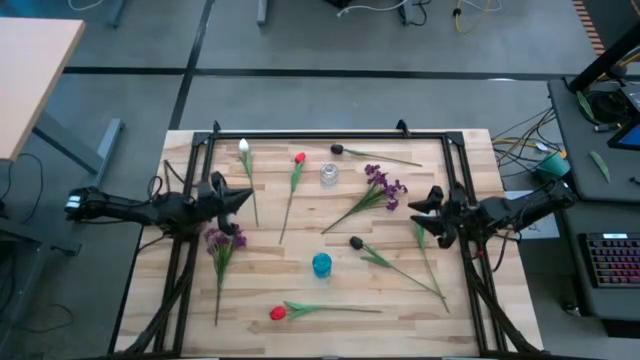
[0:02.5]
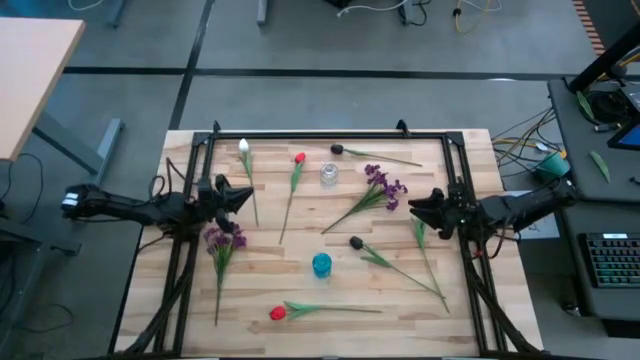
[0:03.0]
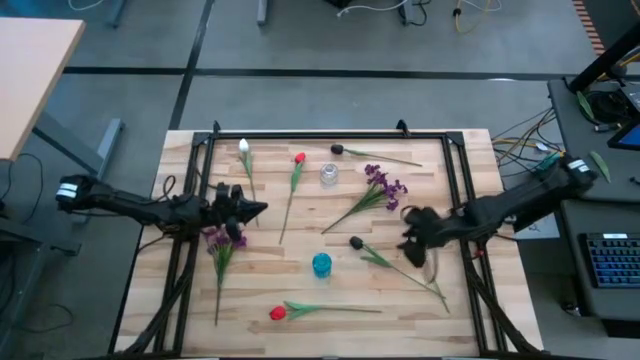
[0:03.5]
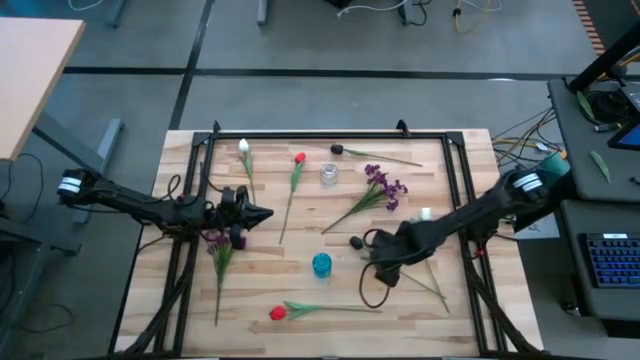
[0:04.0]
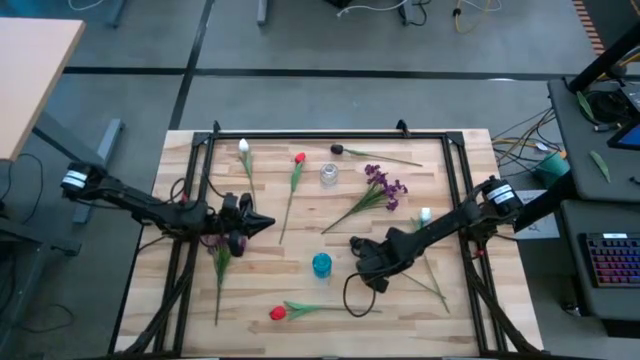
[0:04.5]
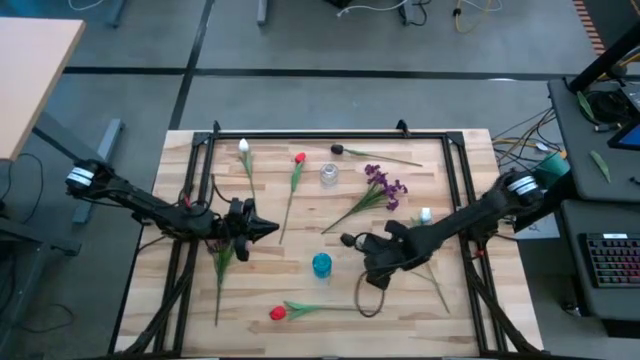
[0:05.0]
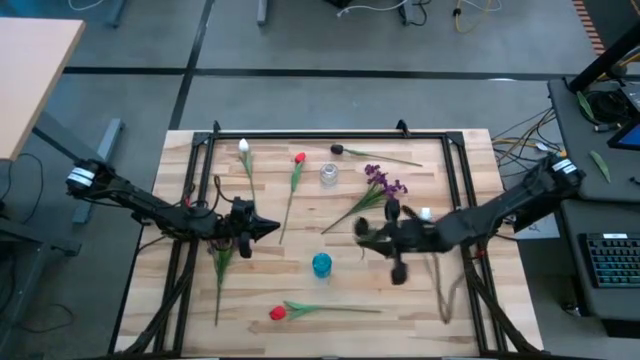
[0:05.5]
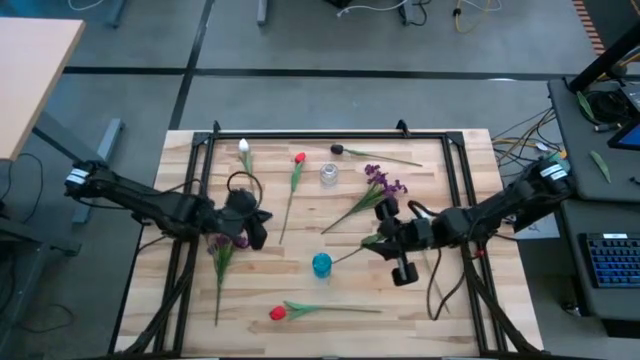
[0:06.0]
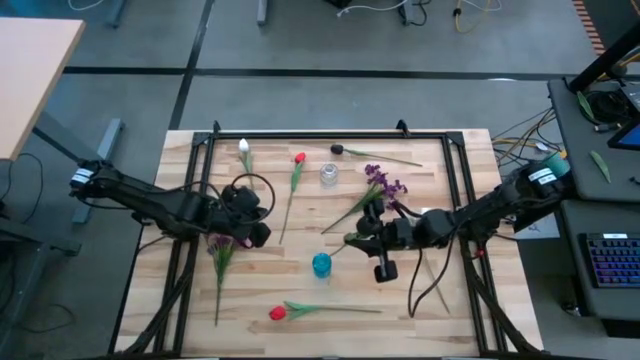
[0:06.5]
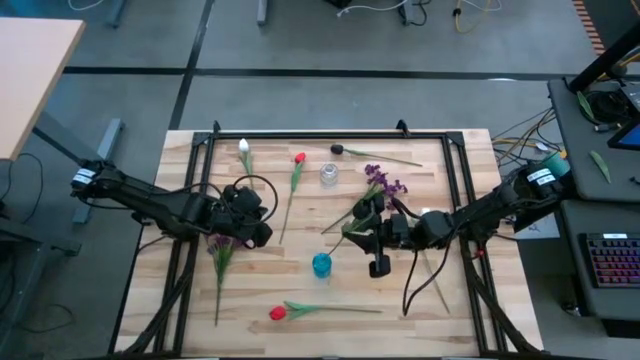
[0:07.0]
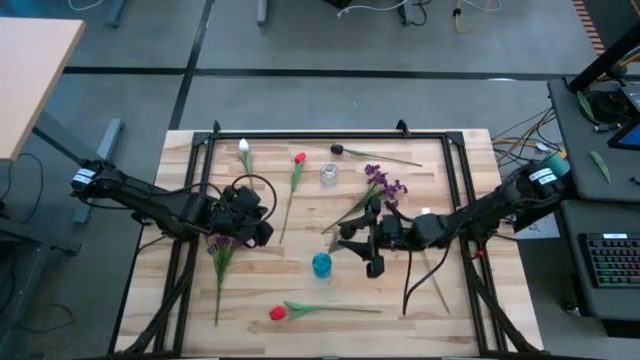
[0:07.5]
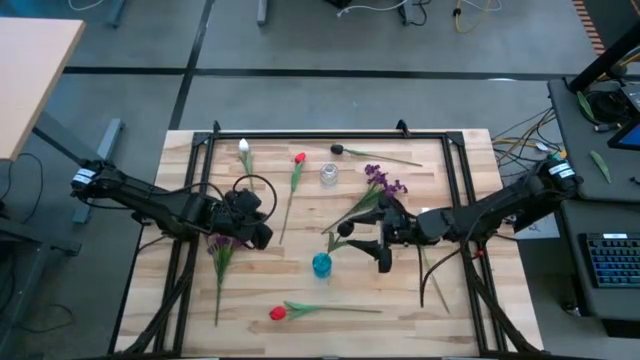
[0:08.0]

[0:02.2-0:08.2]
Task: Sort flowers into vase by color
Put the bottom black flower into the blue vase

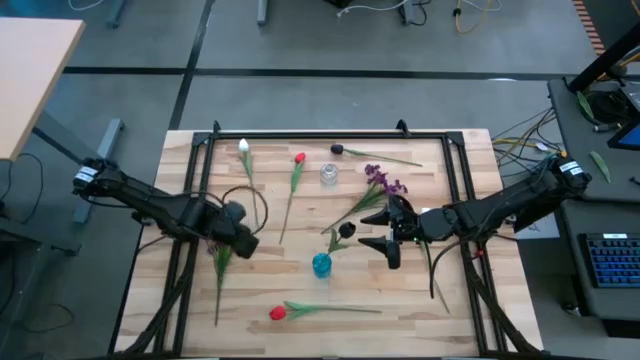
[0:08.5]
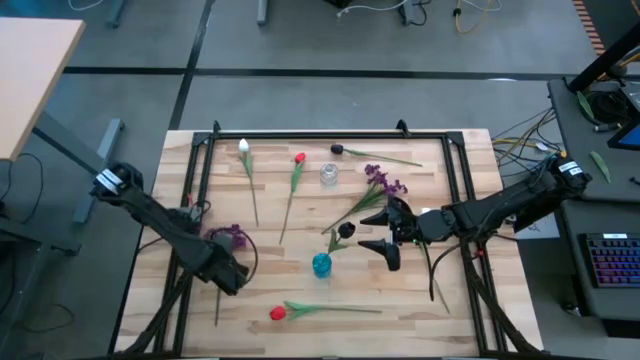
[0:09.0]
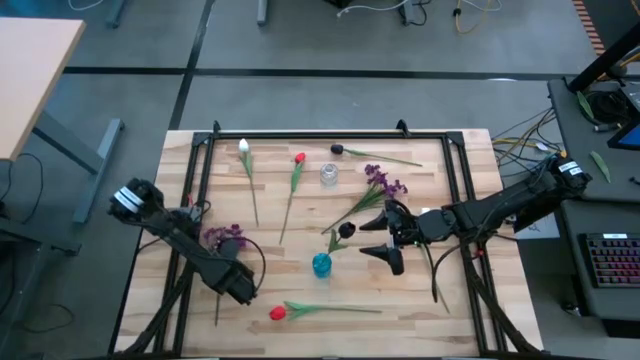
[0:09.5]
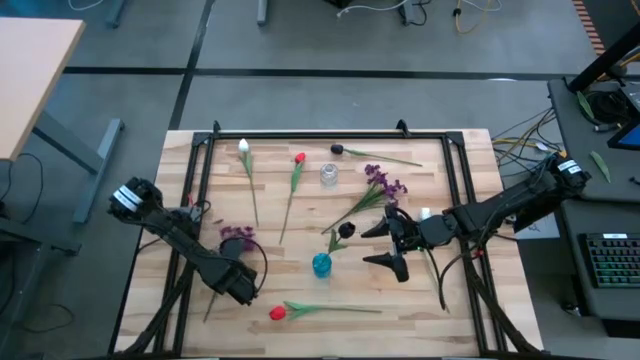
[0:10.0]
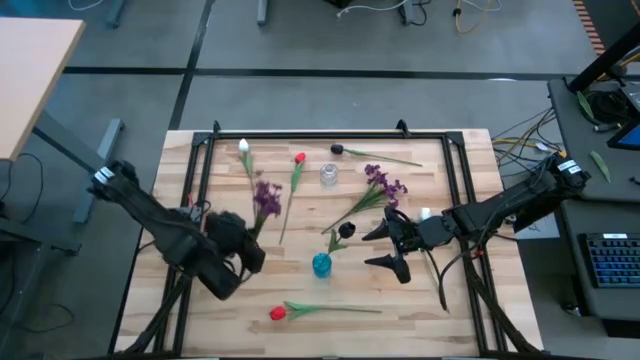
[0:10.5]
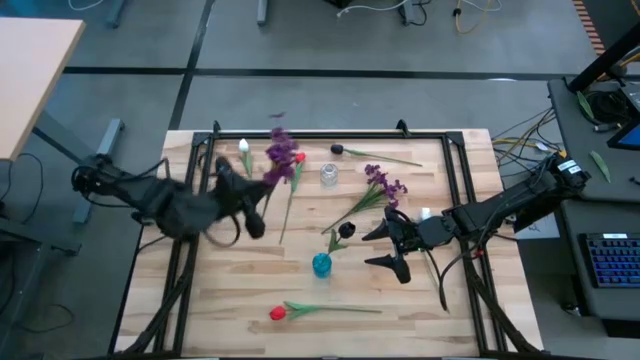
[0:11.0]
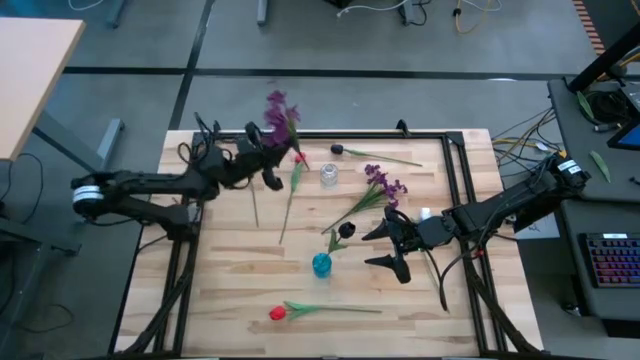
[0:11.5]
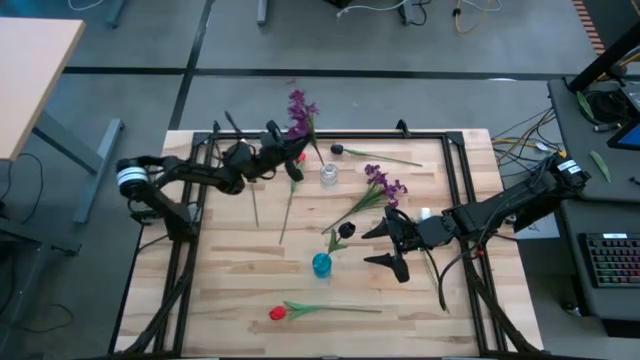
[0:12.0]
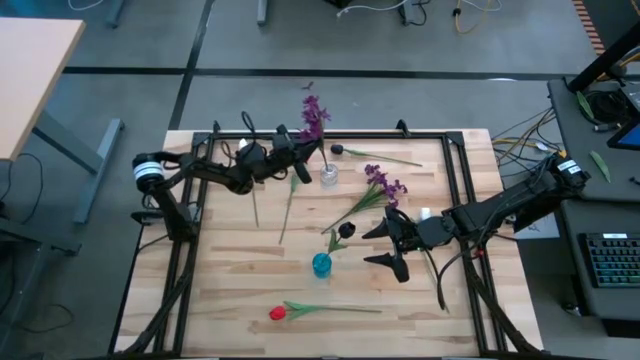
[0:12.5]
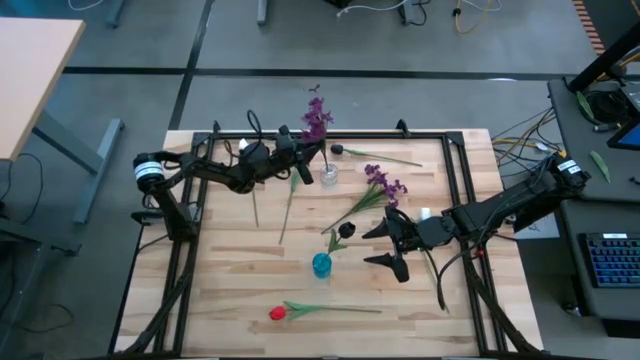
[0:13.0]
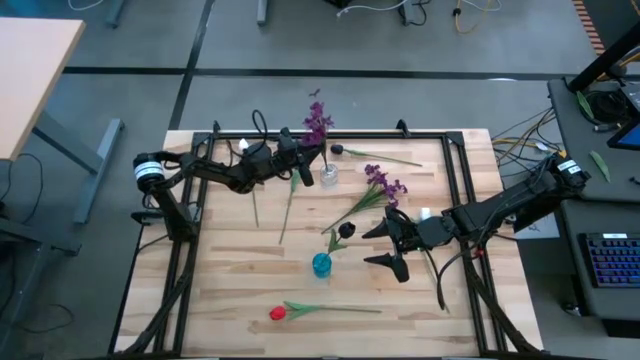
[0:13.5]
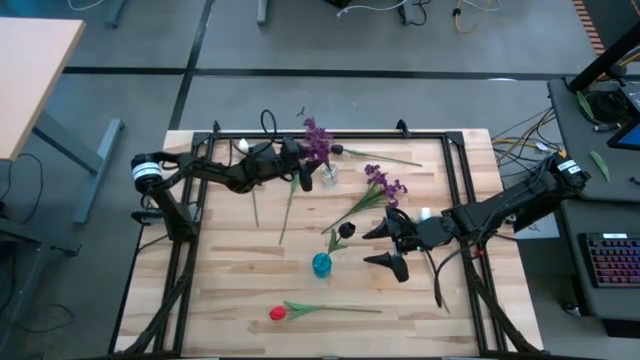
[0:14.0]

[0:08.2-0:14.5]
Put the top violet flowers into the transparent vase

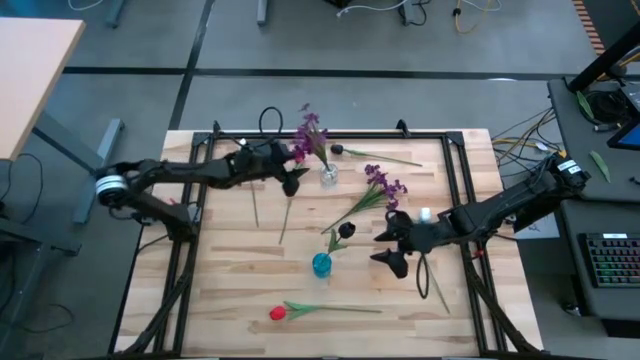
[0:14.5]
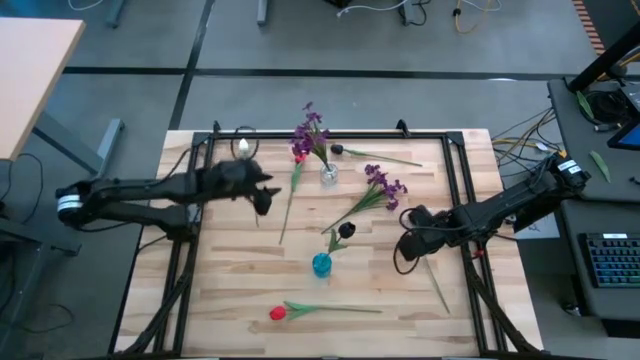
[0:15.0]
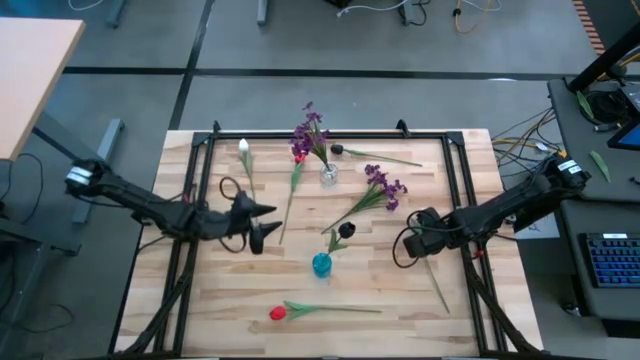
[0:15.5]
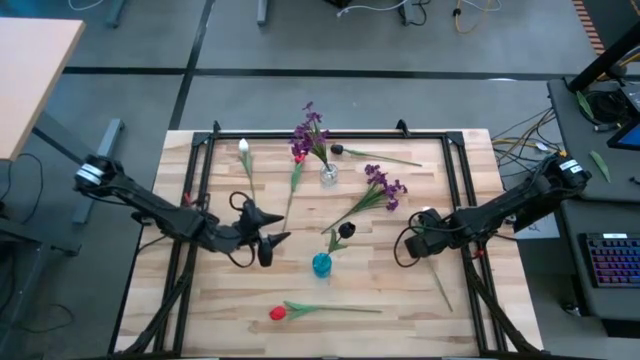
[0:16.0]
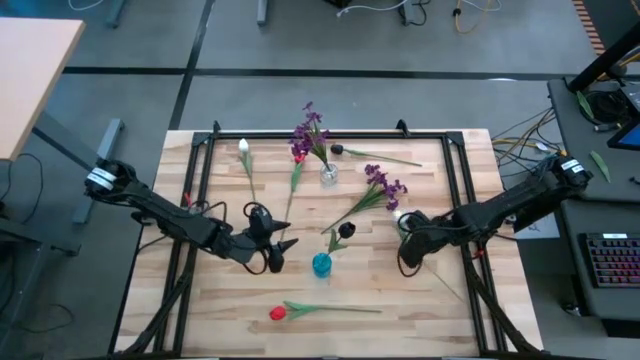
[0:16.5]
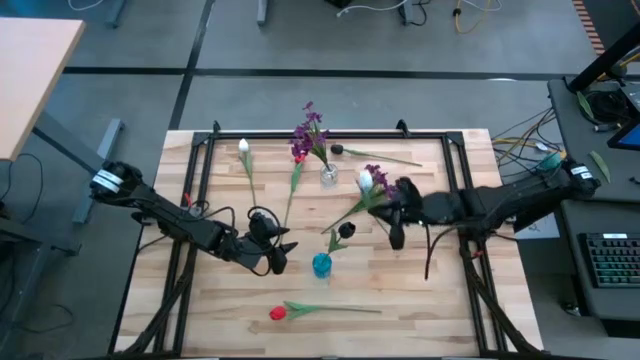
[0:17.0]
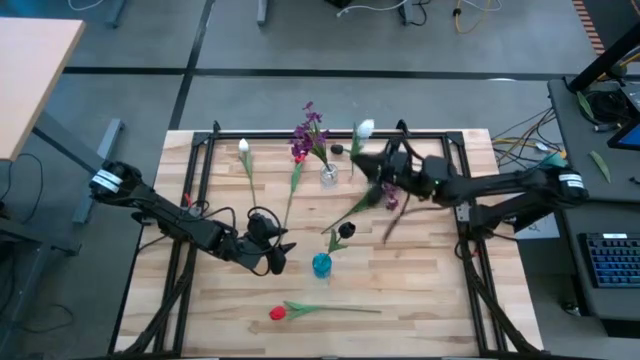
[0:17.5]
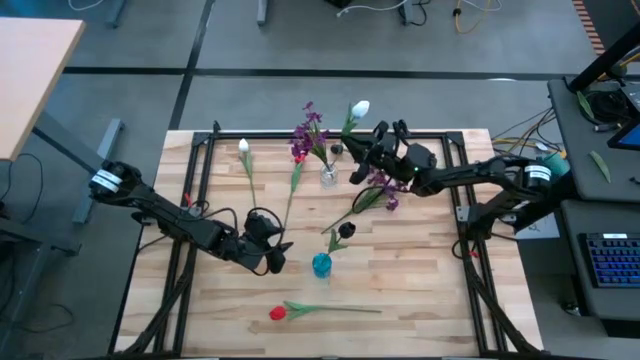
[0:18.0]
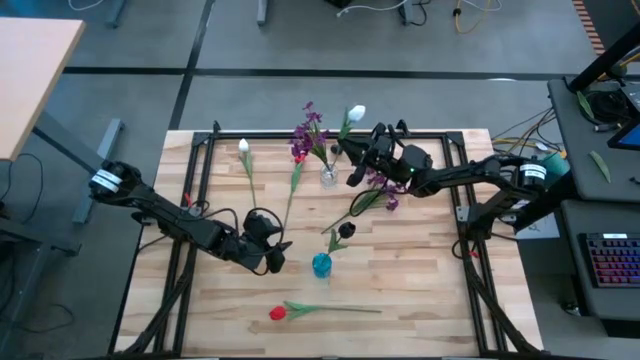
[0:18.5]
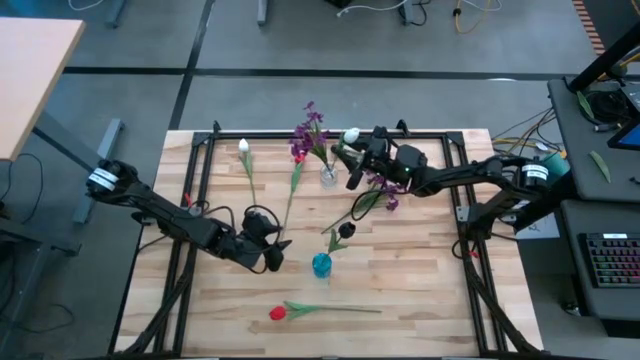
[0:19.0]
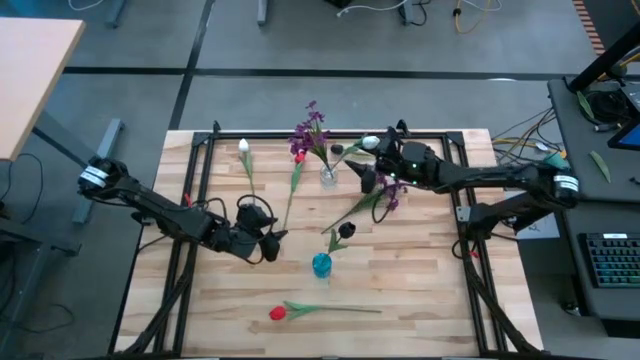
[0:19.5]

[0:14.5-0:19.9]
Put the bottom white flower into the transparent vase

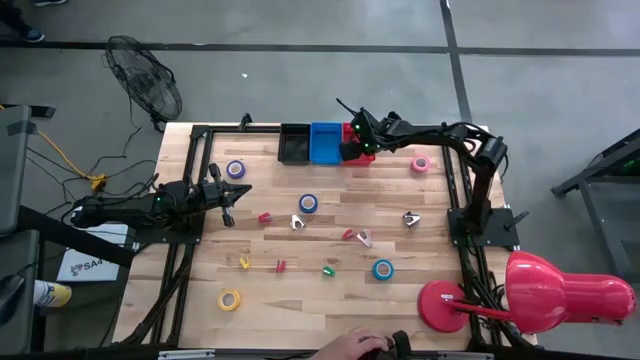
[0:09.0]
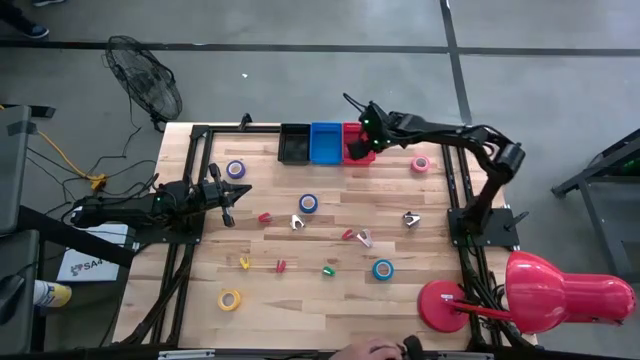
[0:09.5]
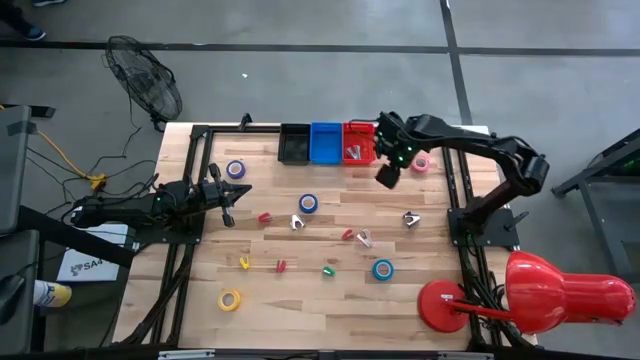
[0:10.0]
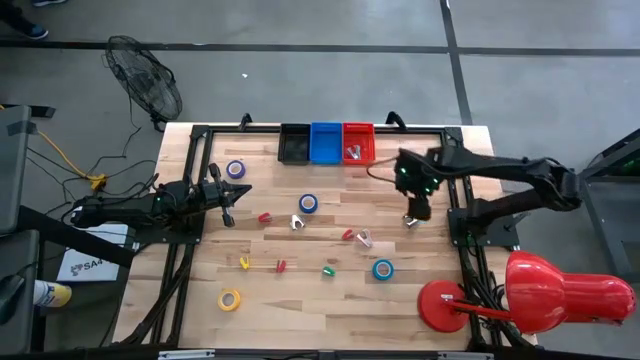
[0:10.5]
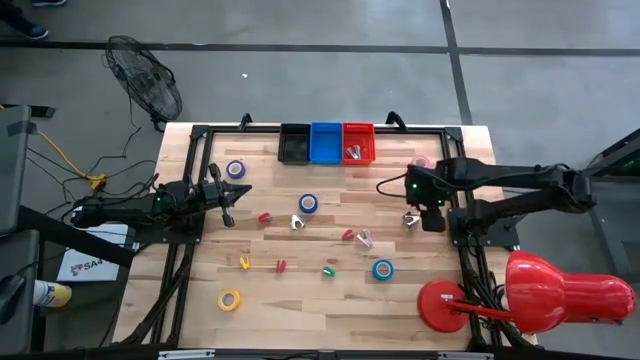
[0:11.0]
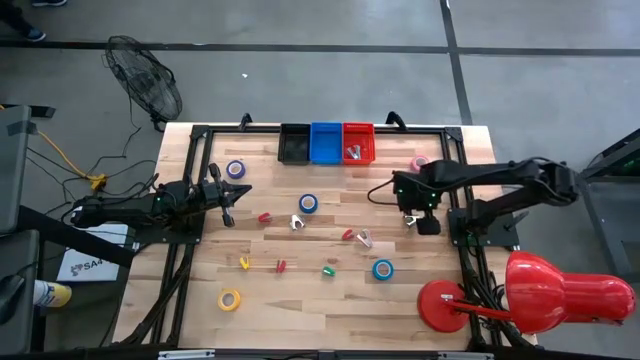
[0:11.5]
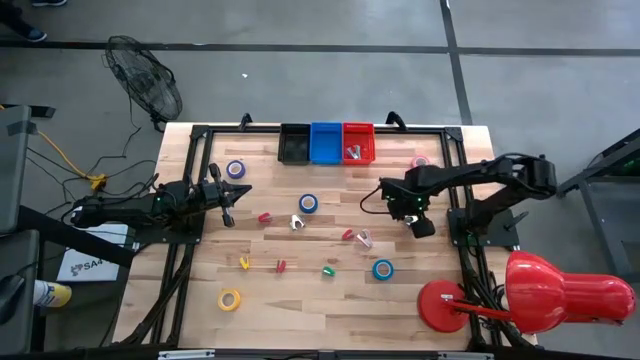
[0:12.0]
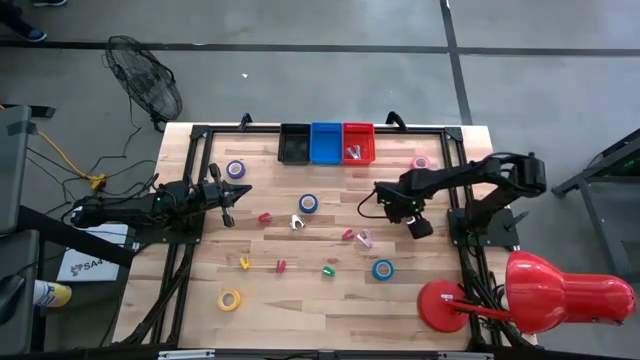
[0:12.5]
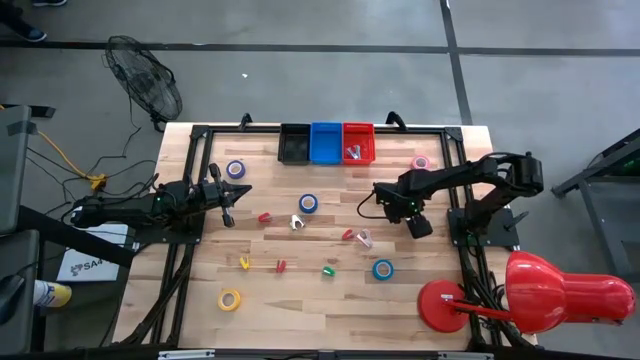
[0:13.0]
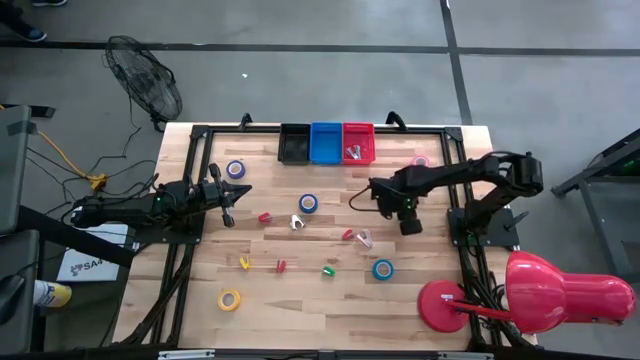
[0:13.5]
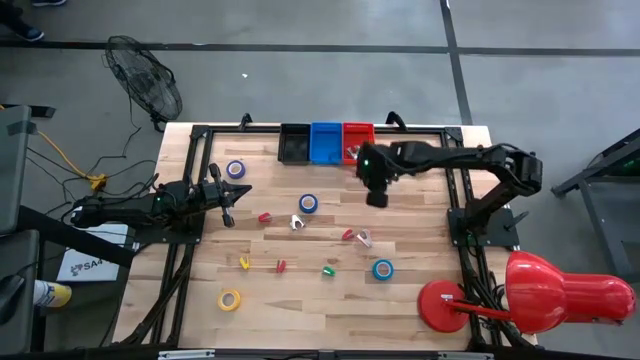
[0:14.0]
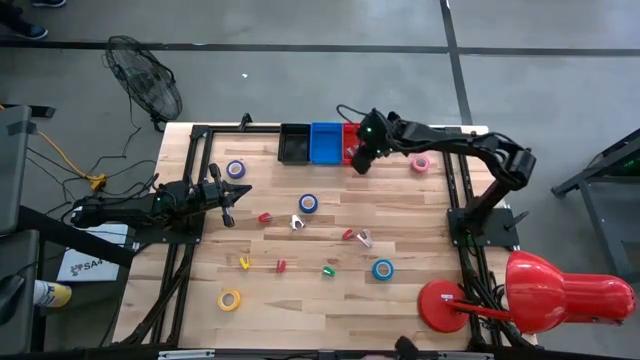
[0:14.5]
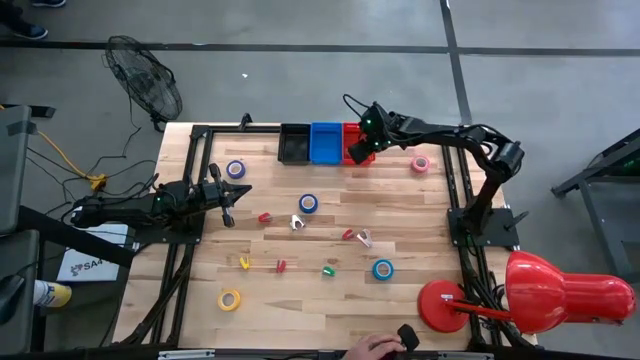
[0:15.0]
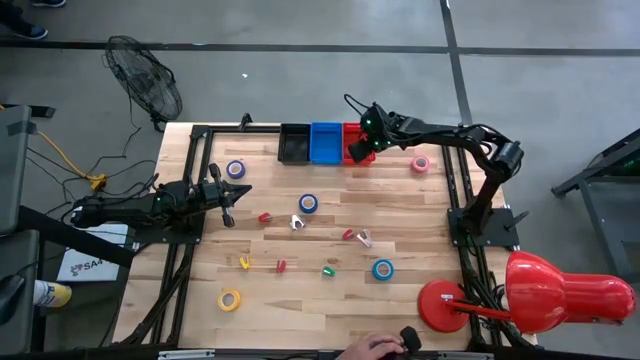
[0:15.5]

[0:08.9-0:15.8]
Task: Pick and place Stapler, Stapler remover, tape
Put the dark gray staple remover into the red bin
